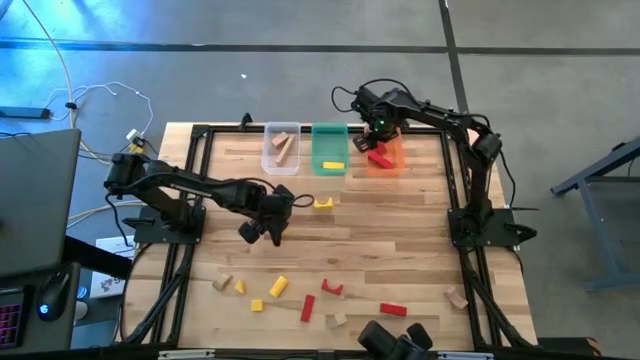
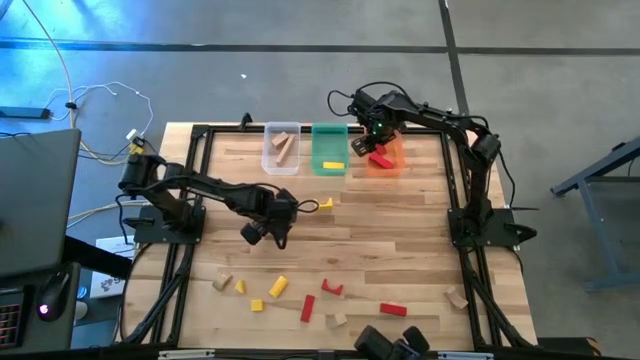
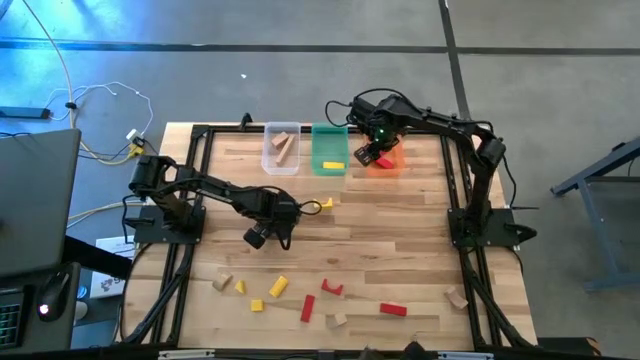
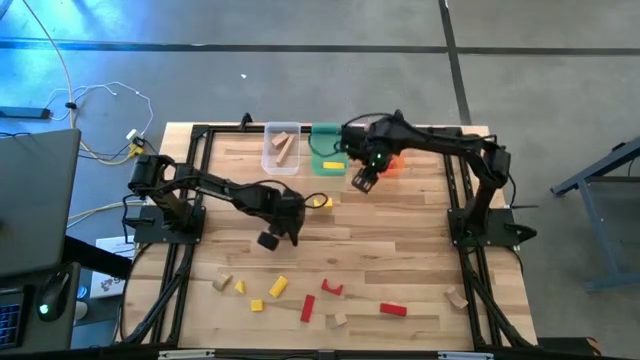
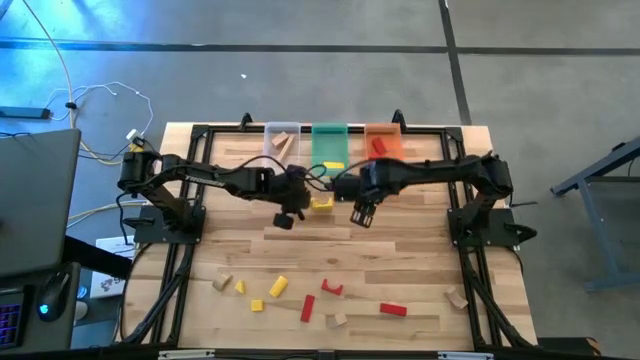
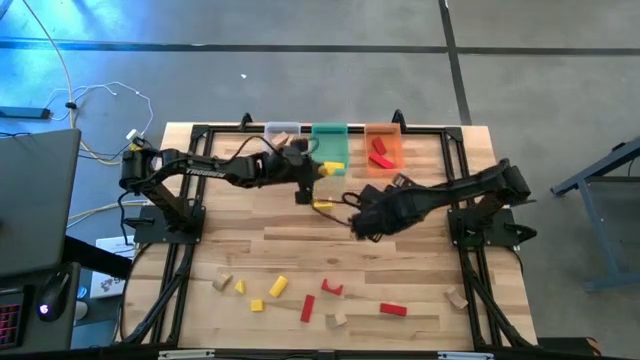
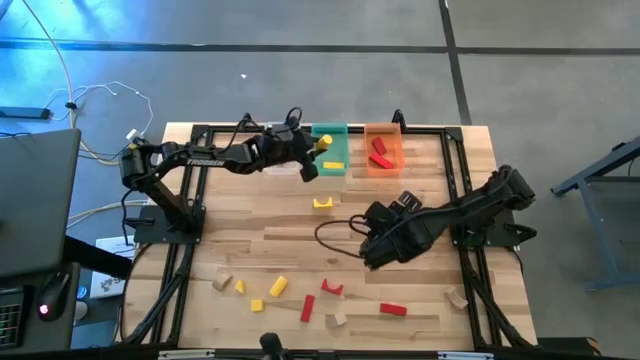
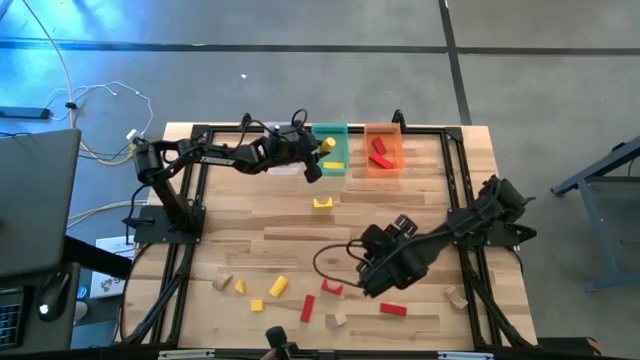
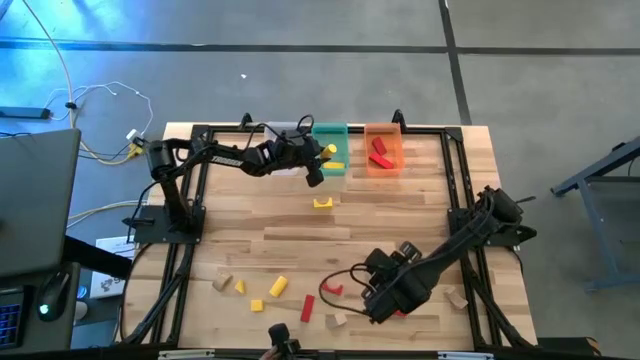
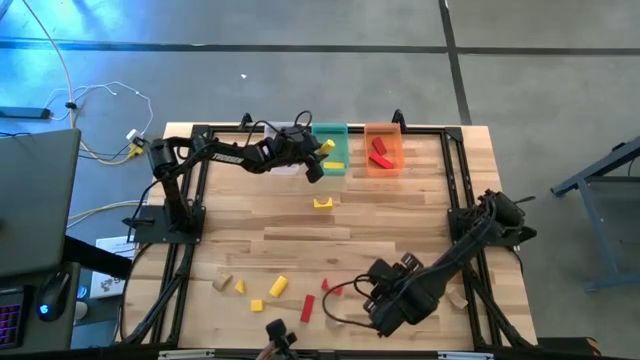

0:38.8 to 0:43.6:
Task: Sort & place blocks by color
Put the yellow block into the green transparent bin

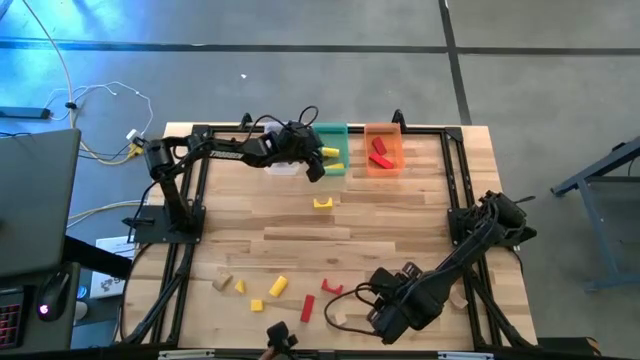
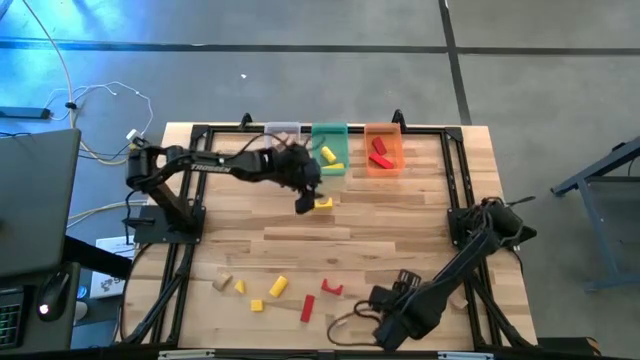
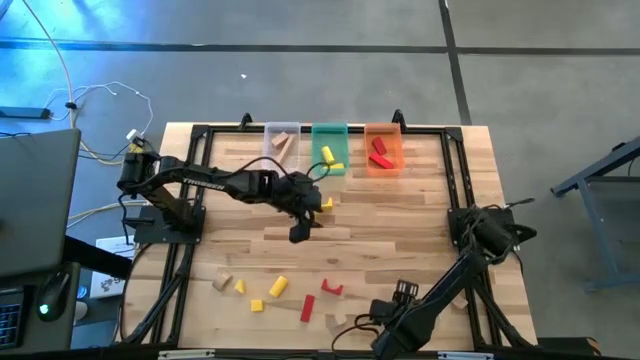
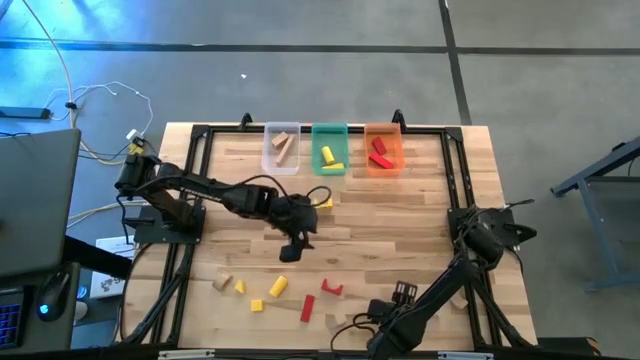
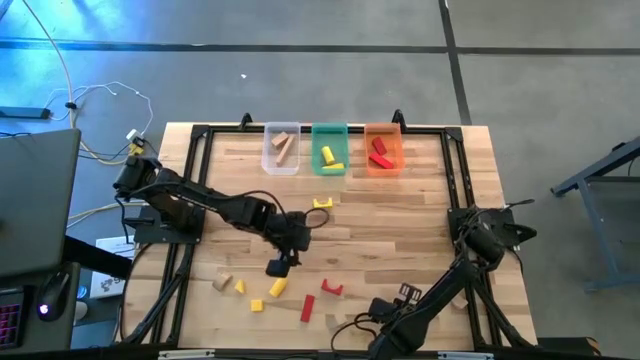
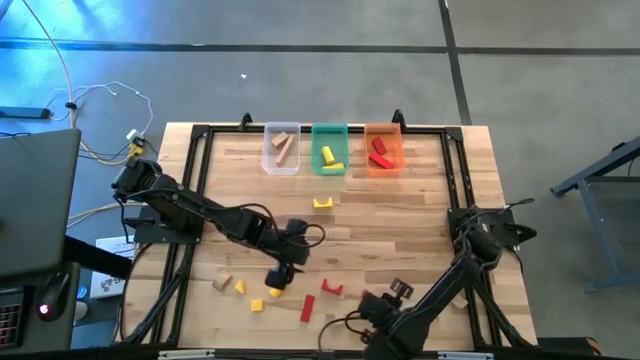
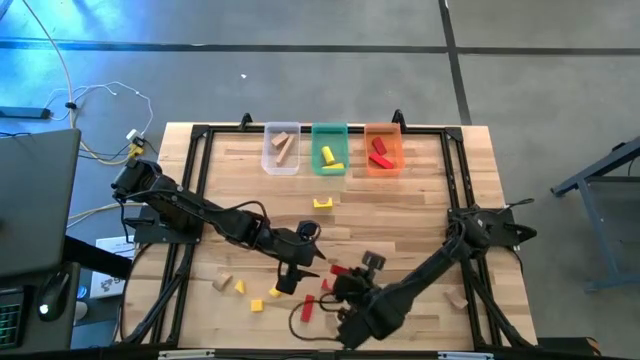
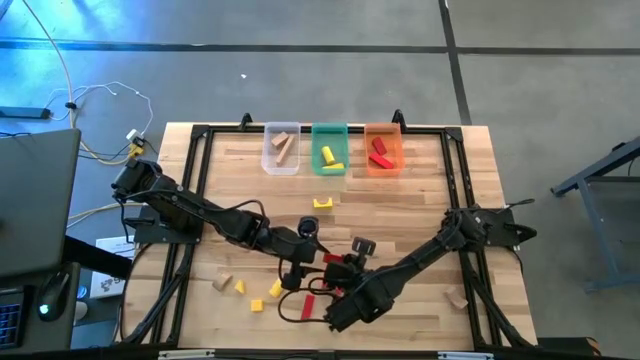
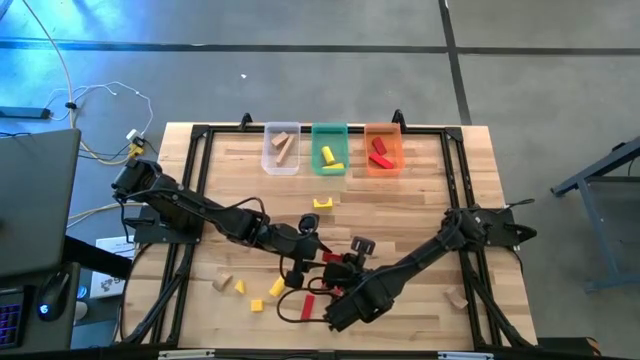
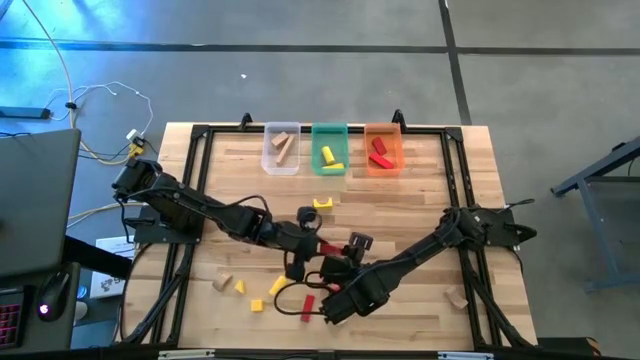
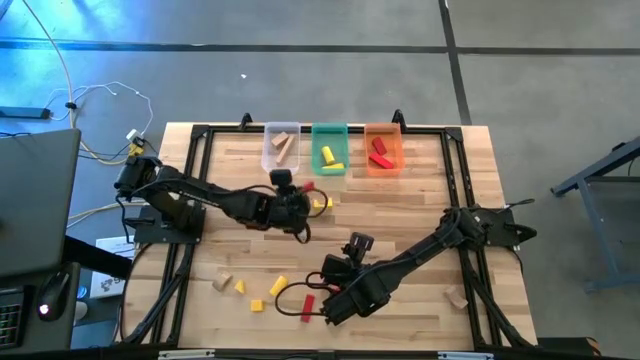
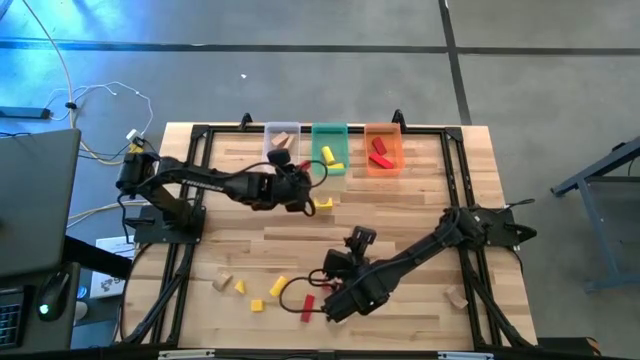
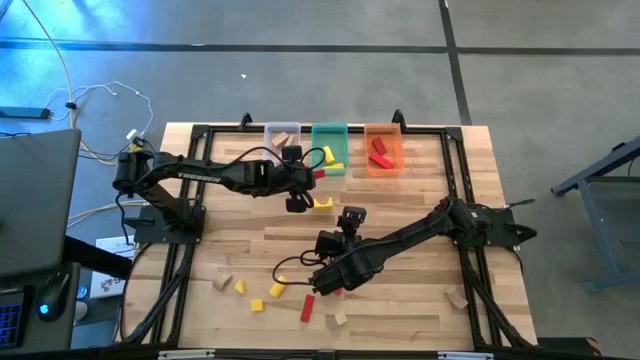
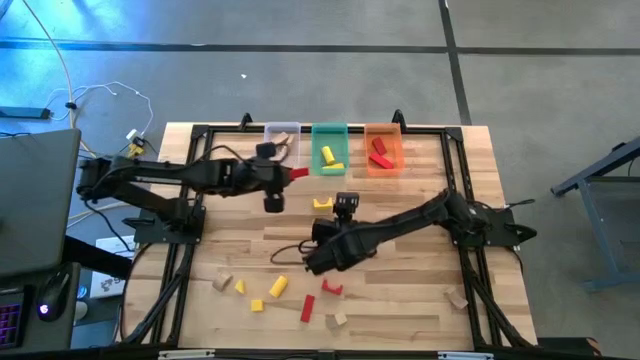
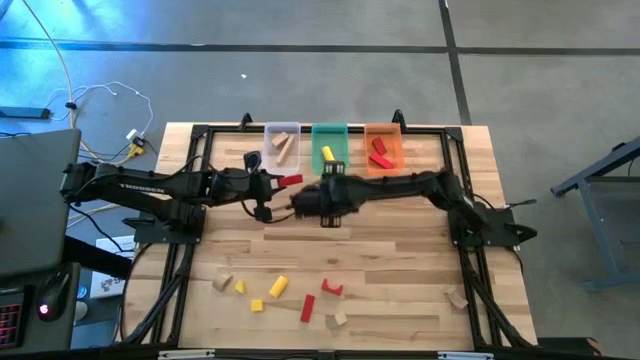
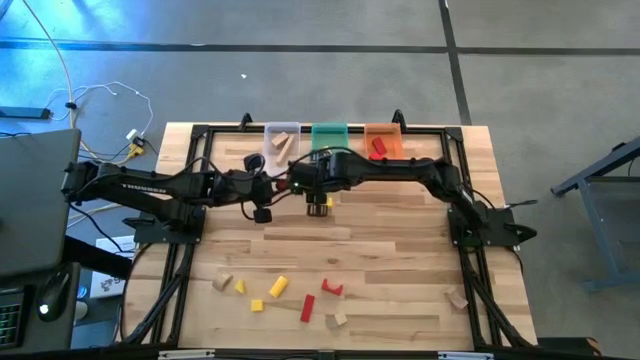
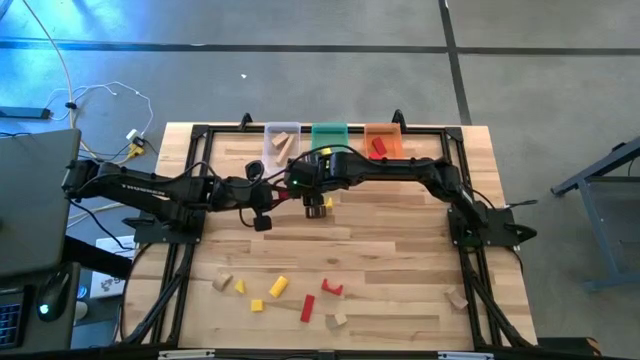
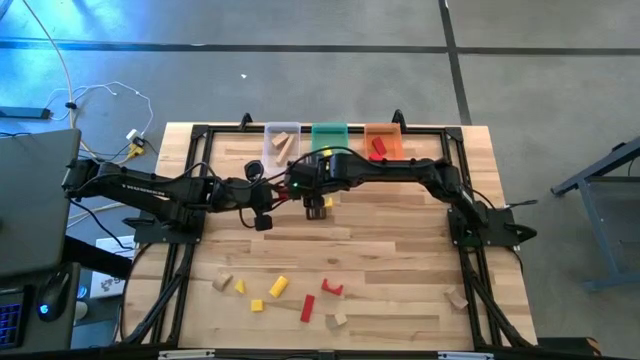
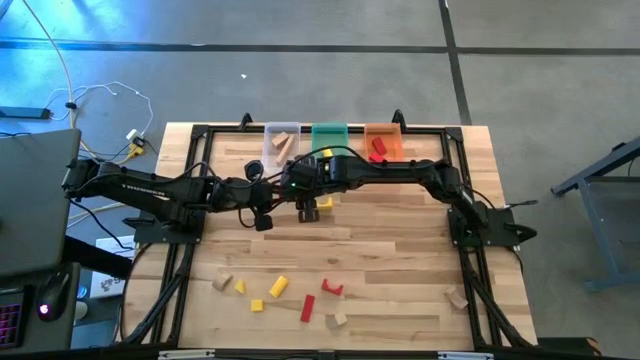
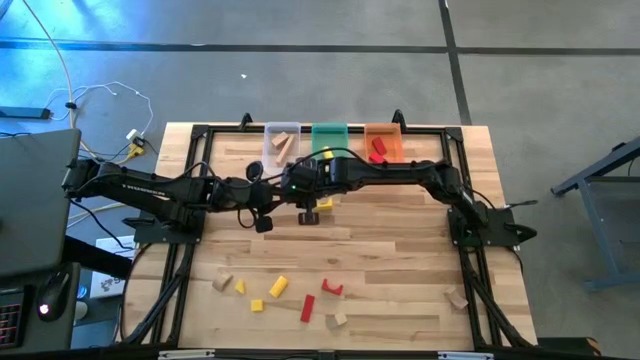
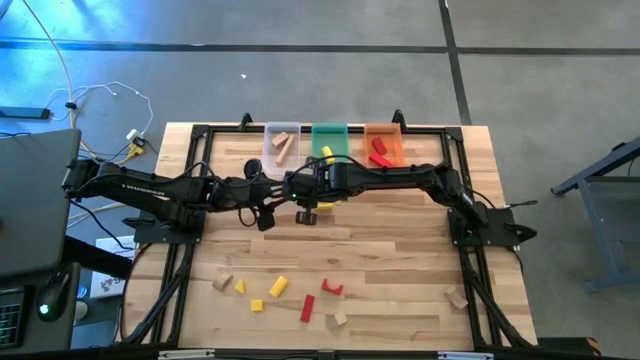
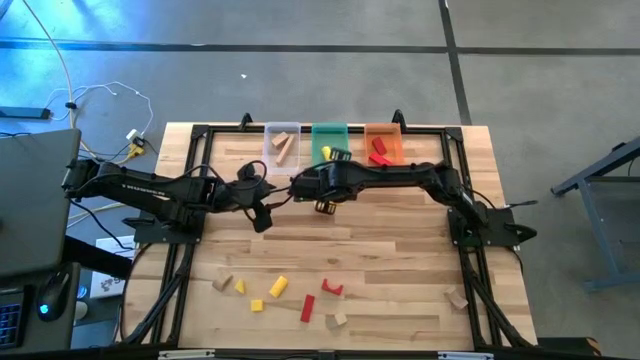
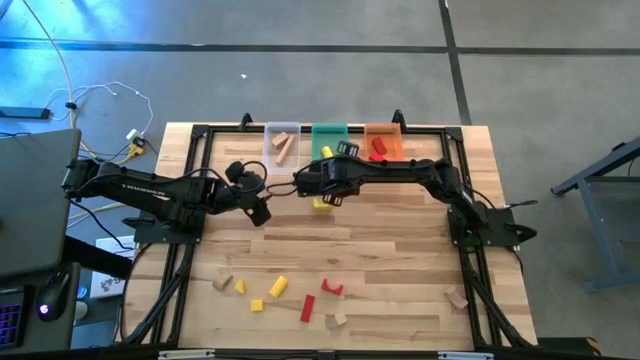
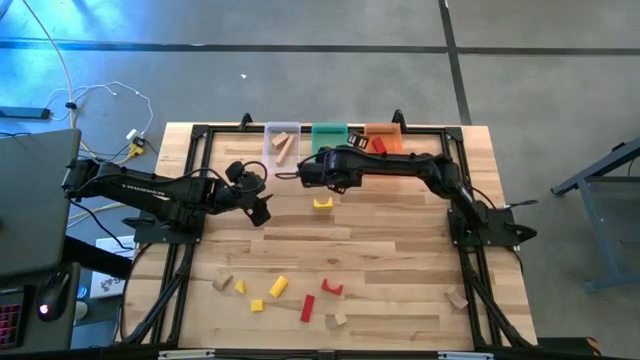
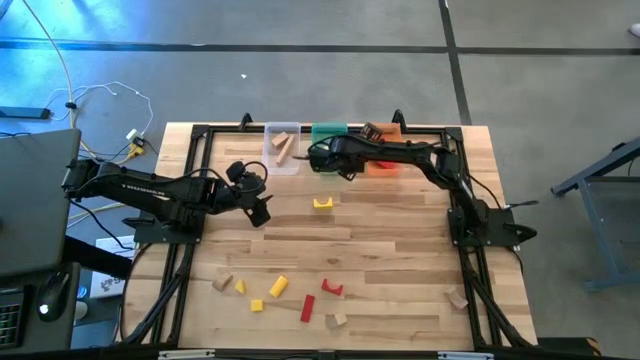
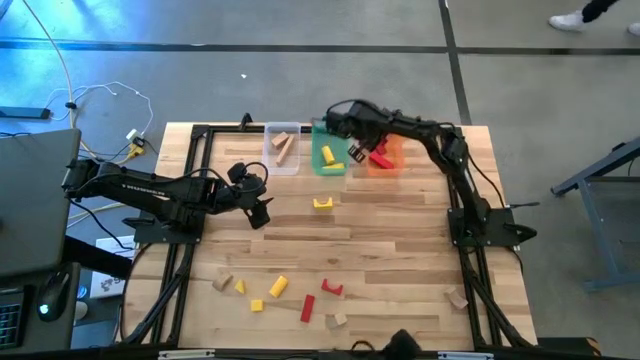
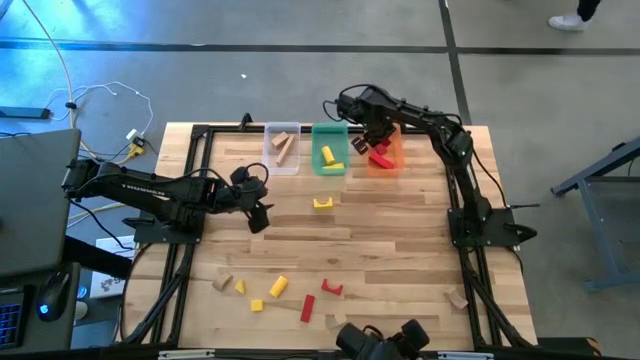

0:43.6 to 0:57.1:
Put the red block into the orange transparent bin

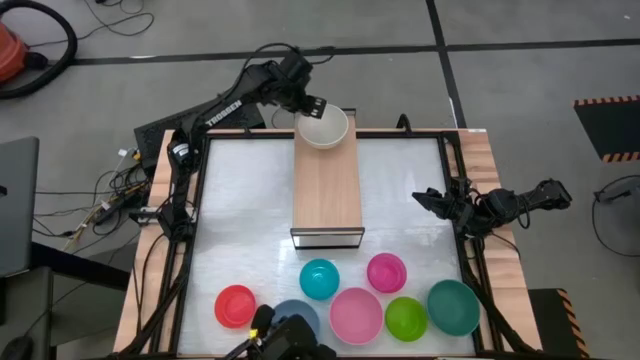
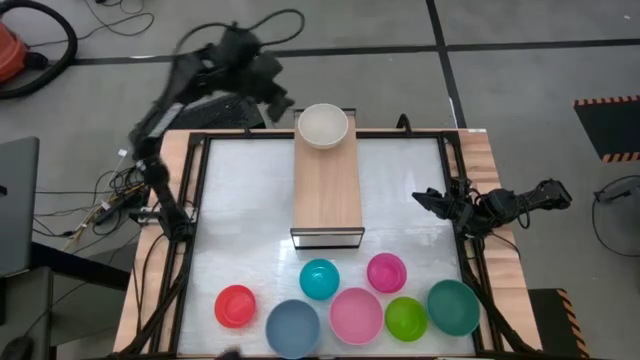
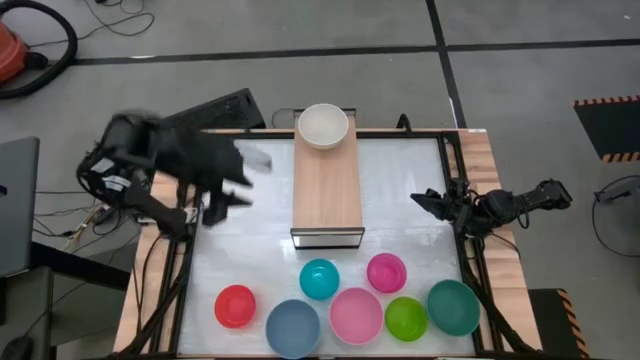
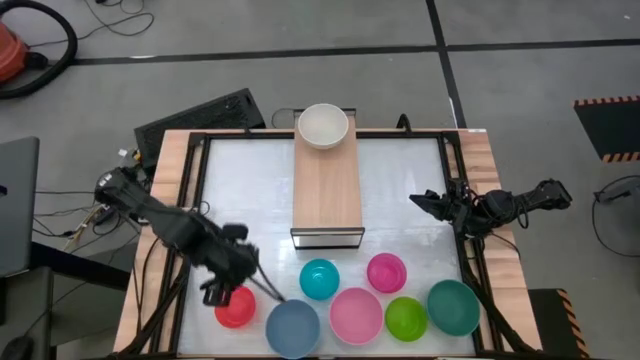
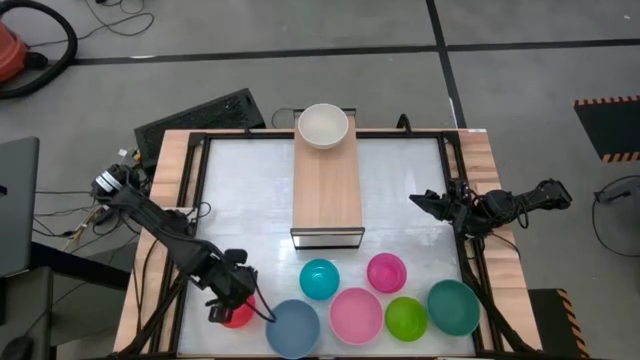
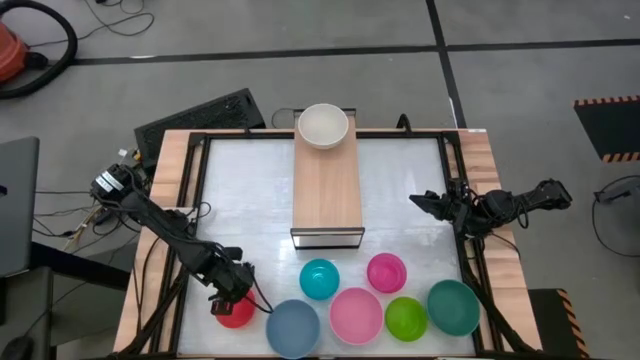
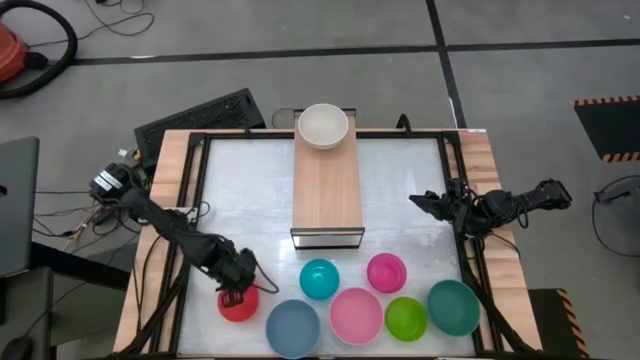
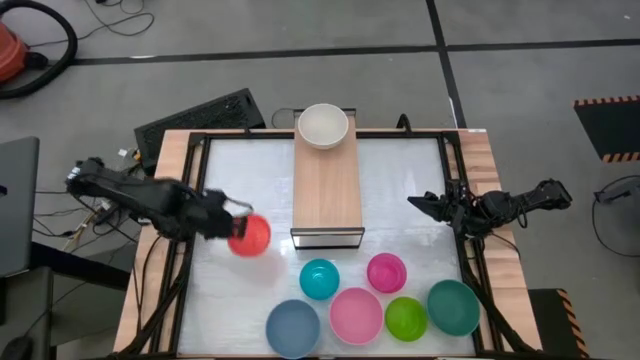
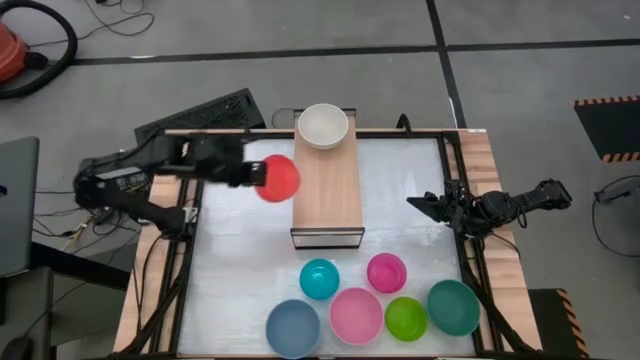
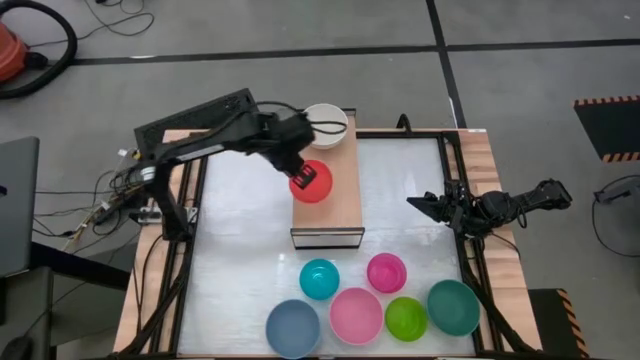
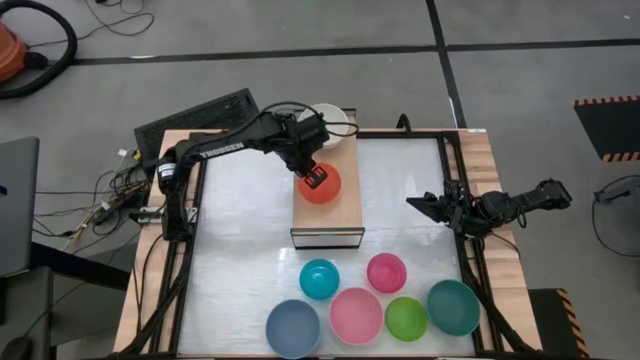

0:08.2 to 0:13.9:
Task: Place and stack bowls onto a shelf
Put the orange bowl on the shelf
